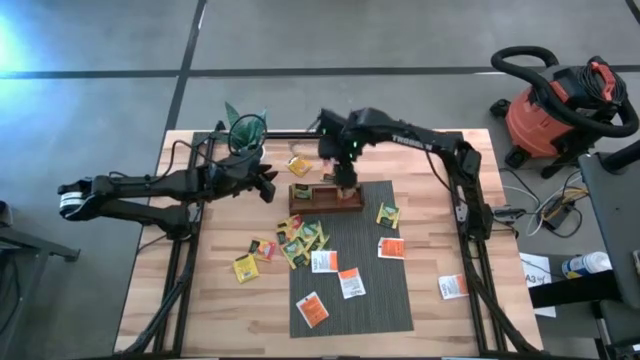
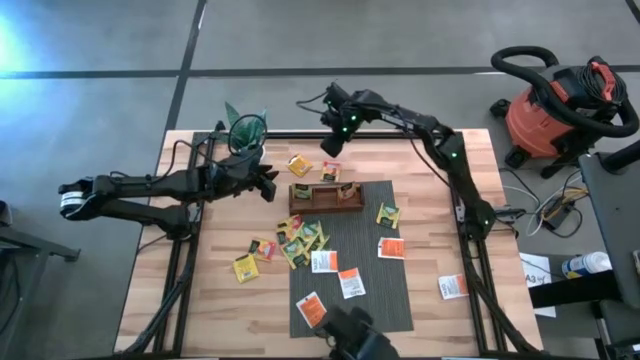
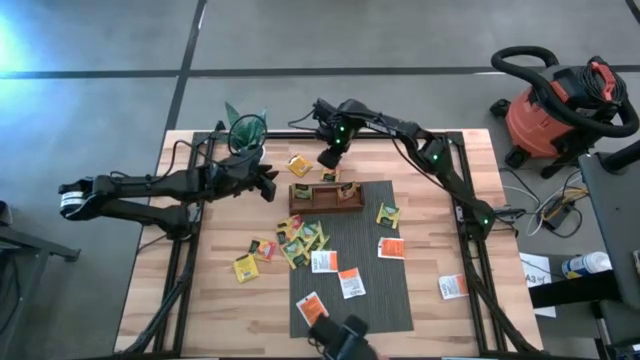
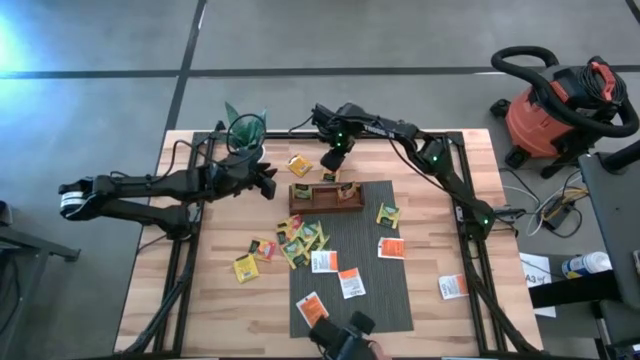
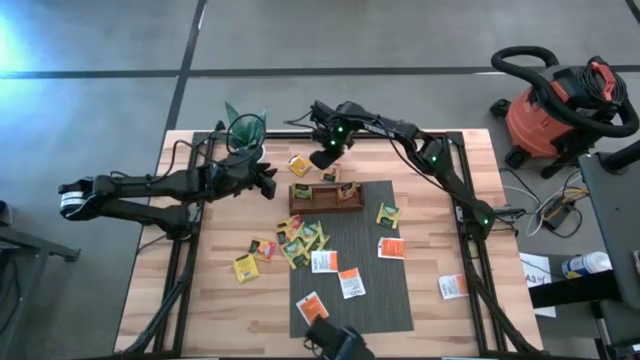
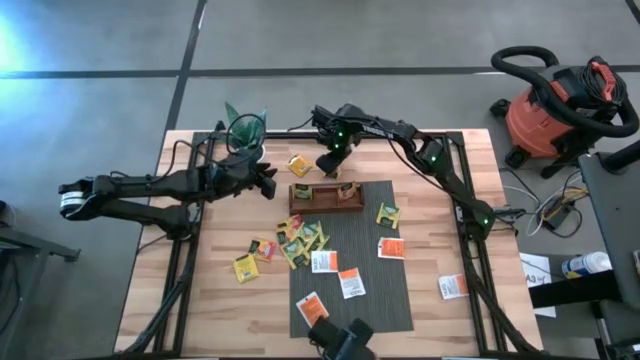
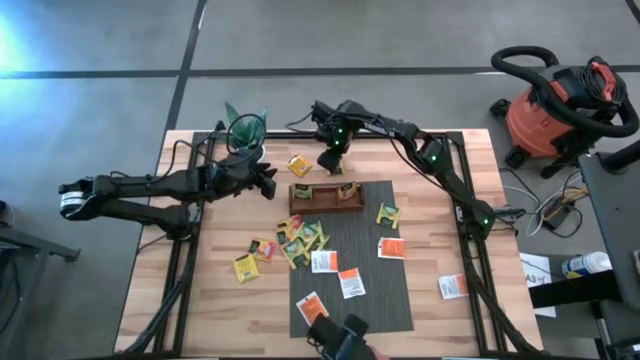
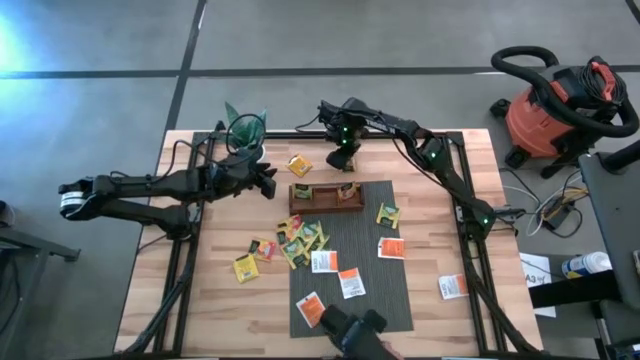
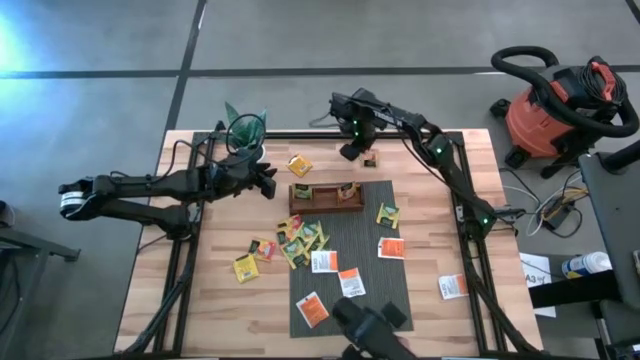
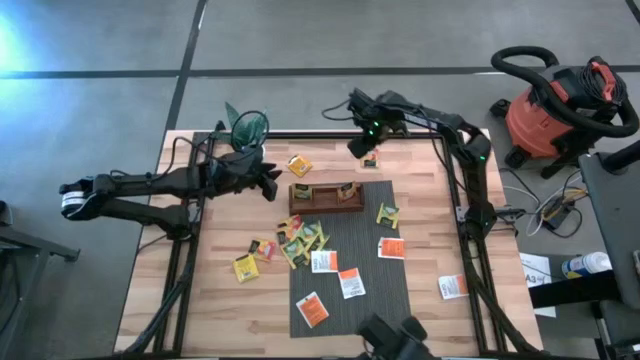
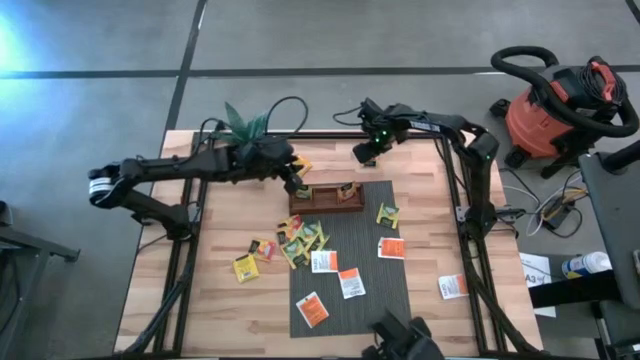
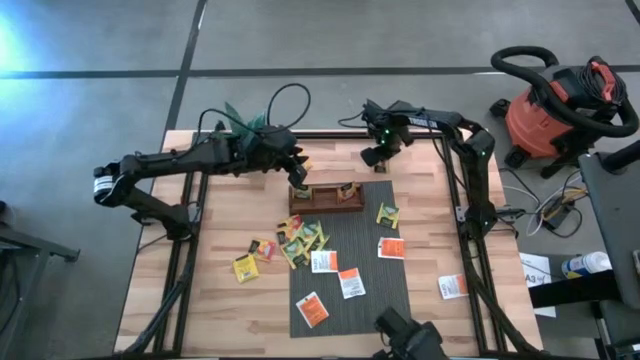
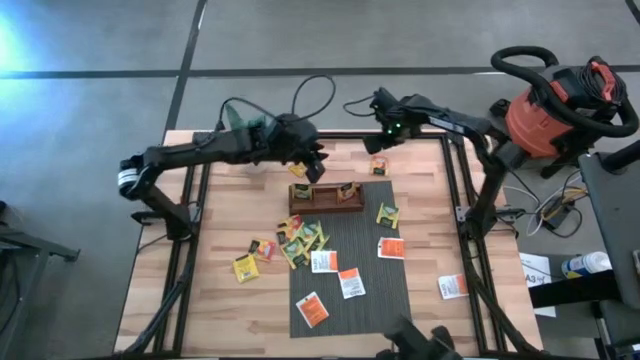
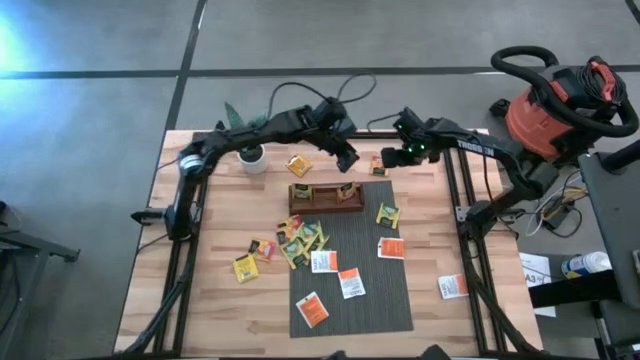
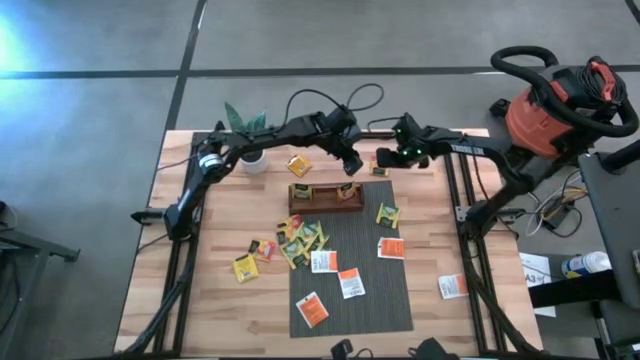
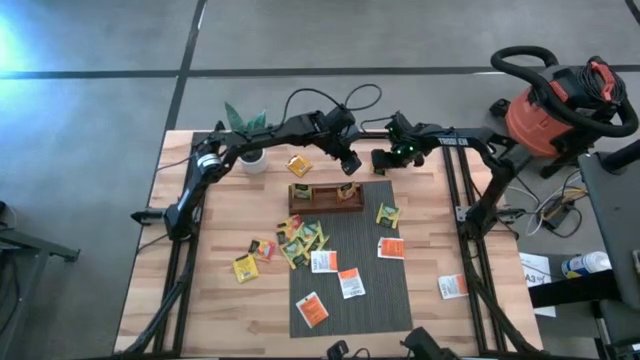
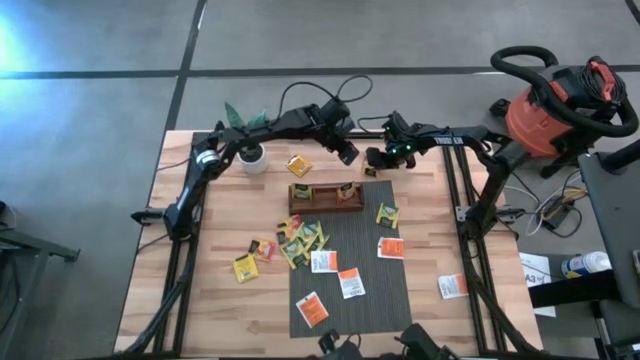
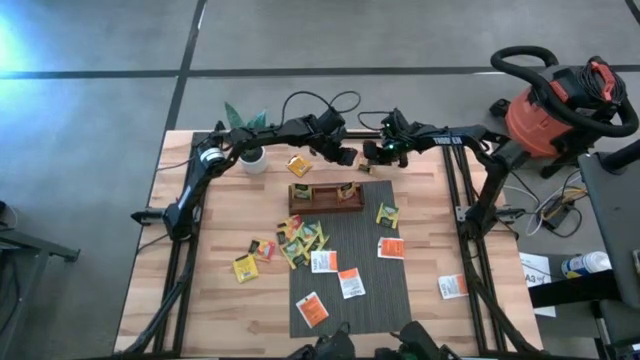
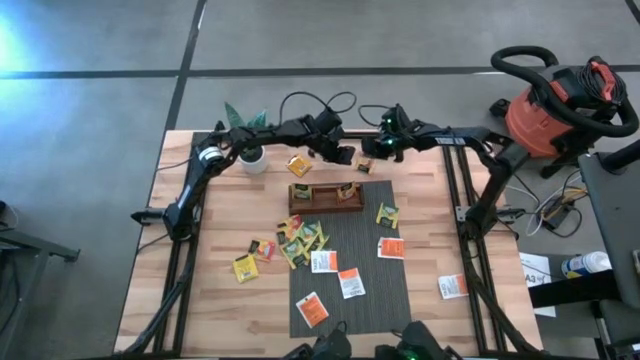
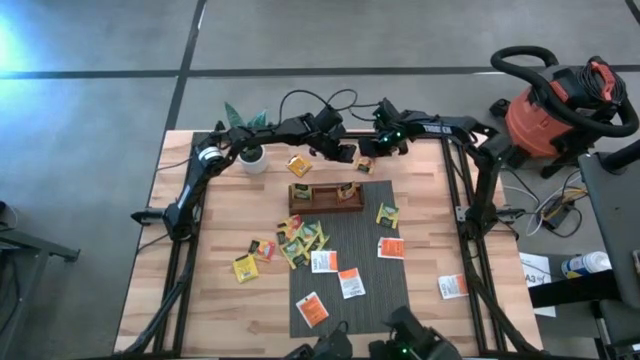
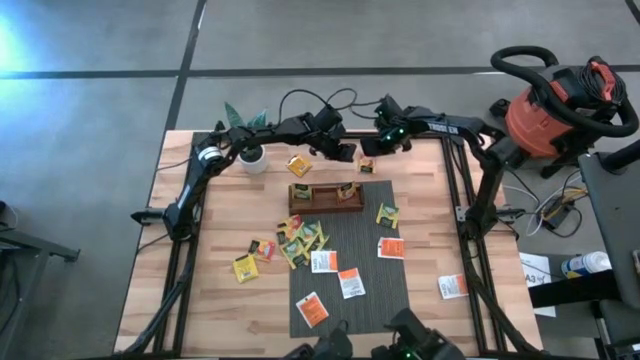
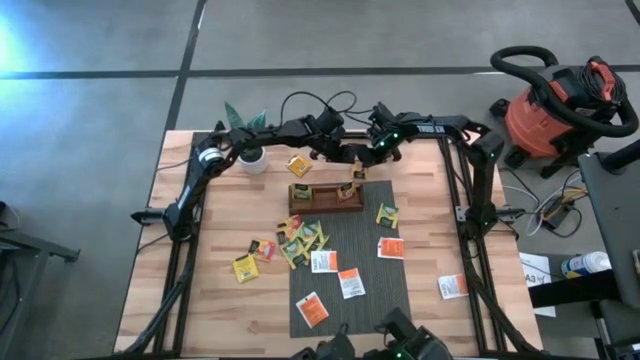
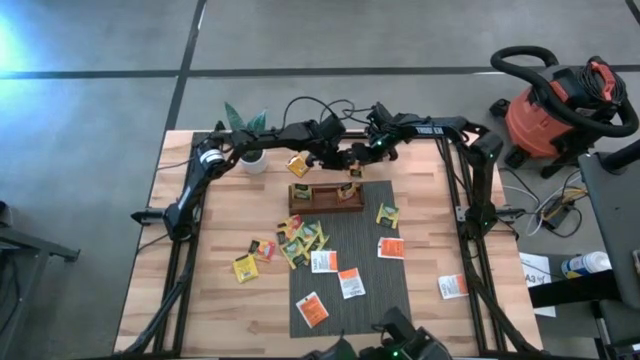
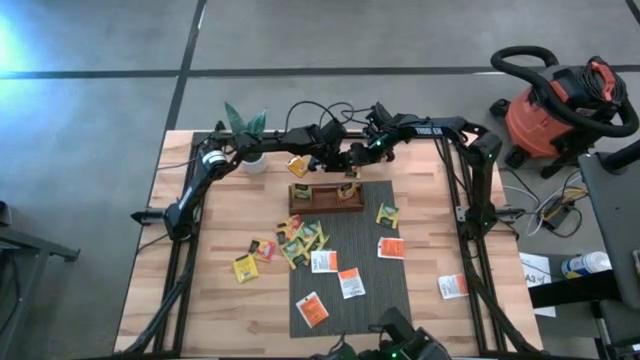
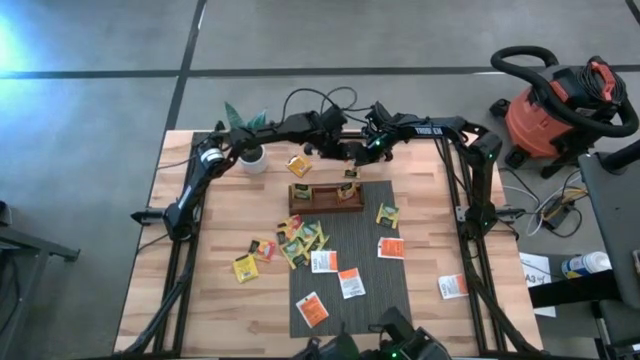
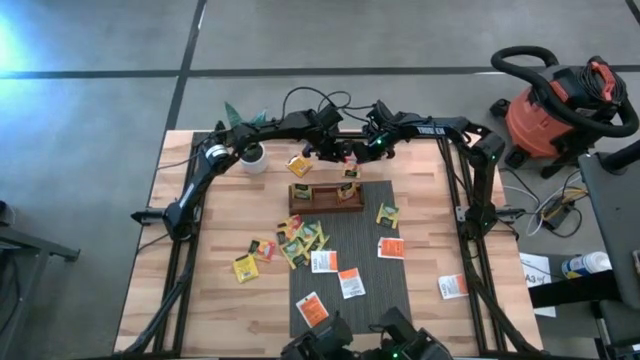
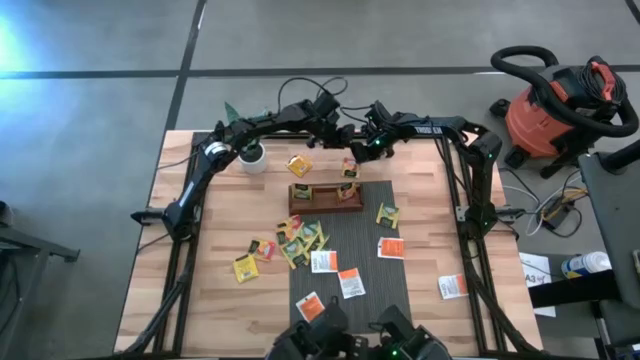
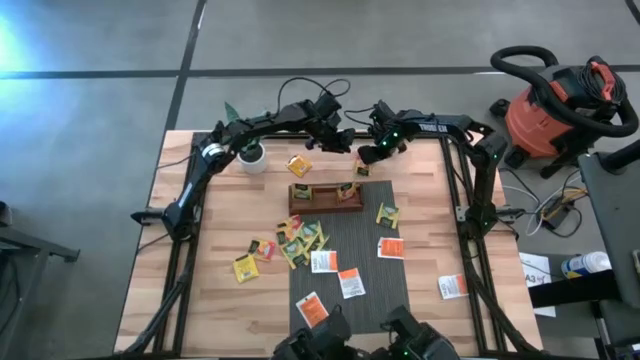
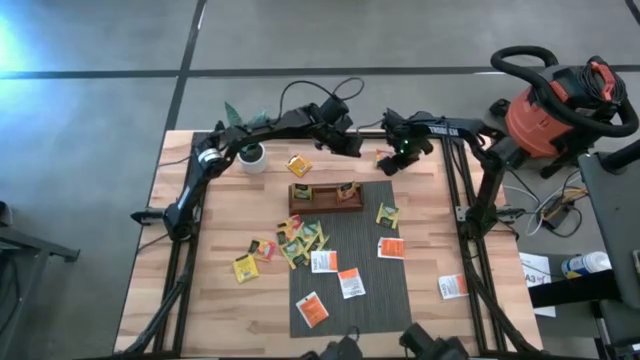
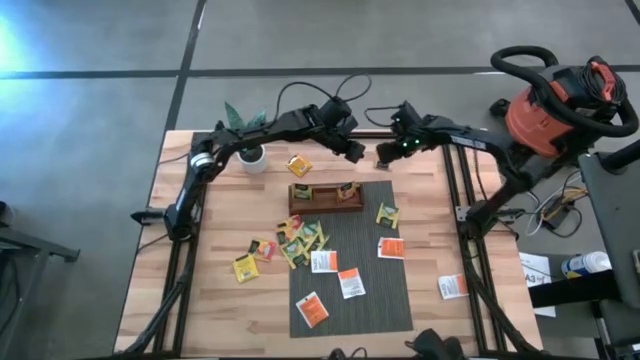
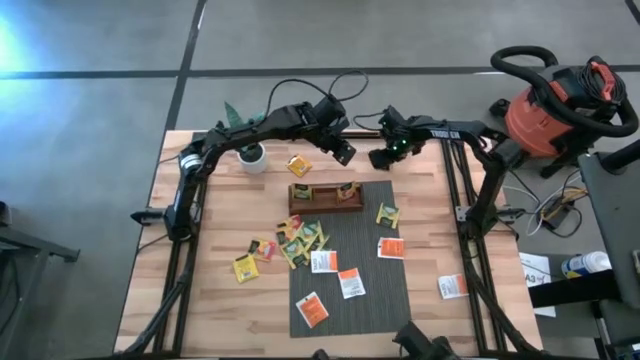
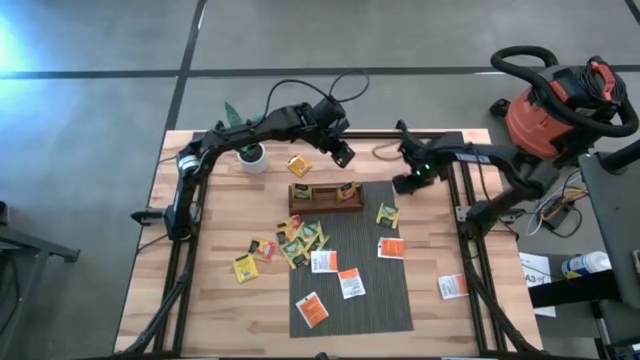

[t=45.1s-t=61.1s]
Task: Pick & Place Tea
Put the orange tea bag into the right compartment of the wooden organizer

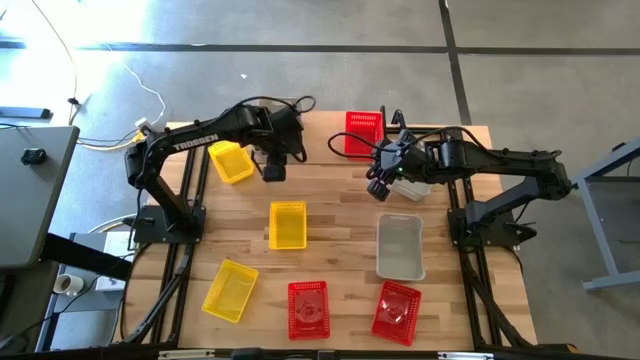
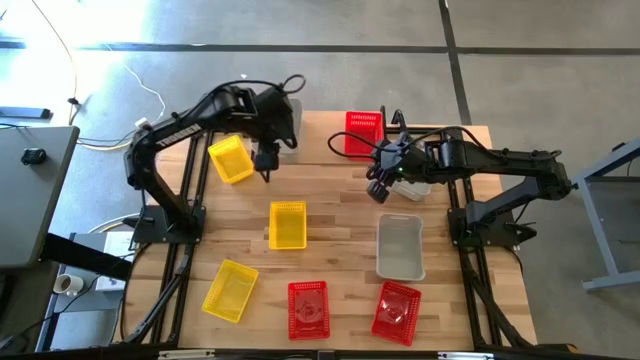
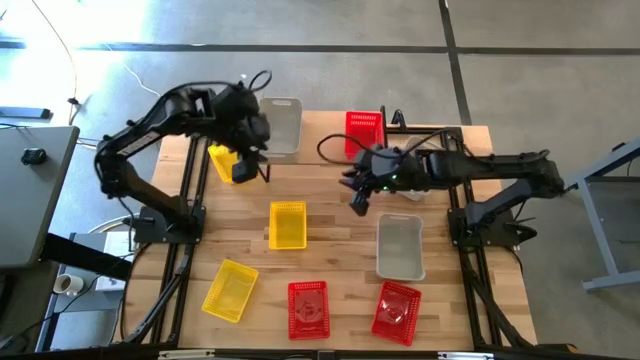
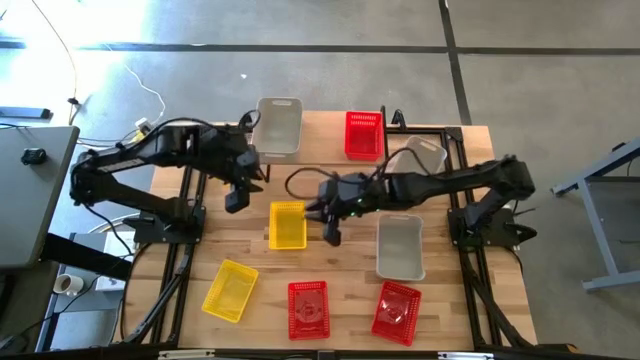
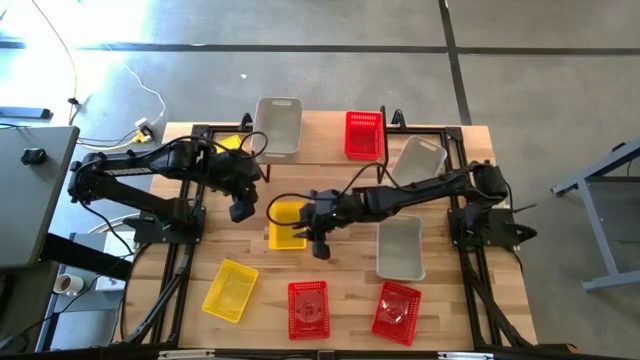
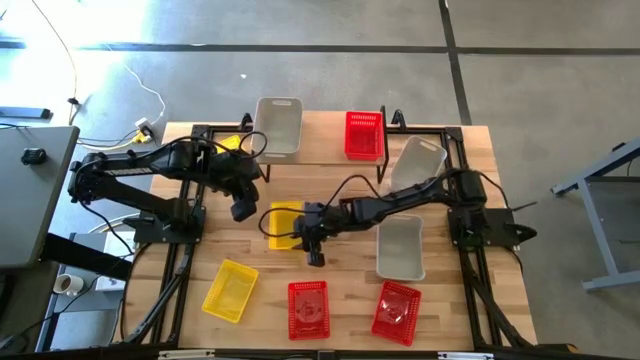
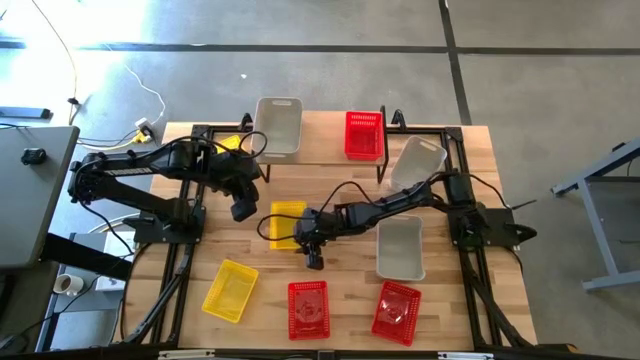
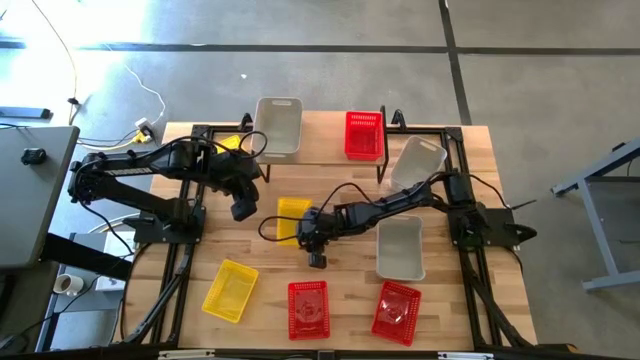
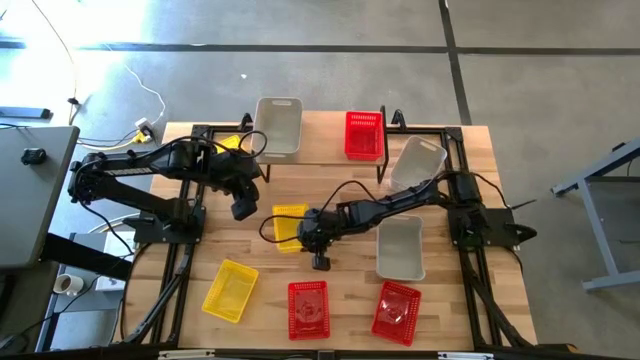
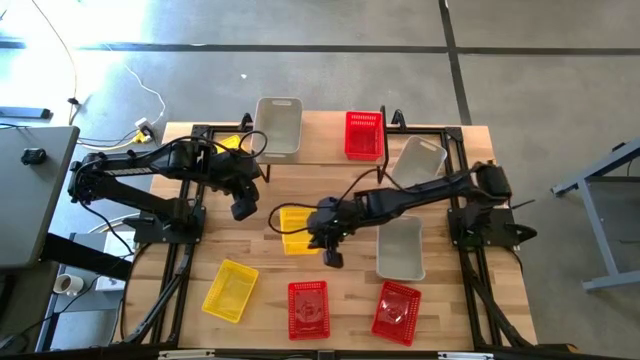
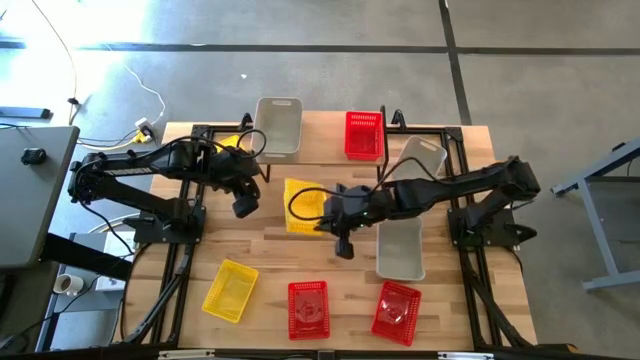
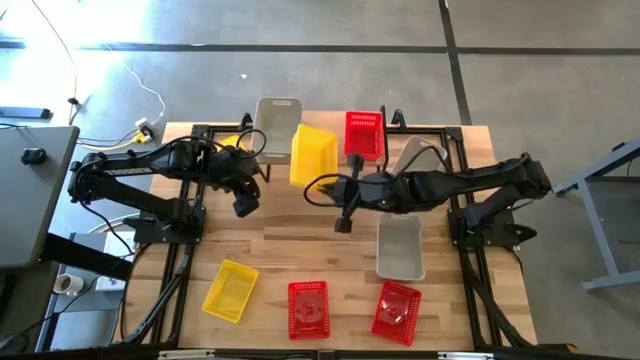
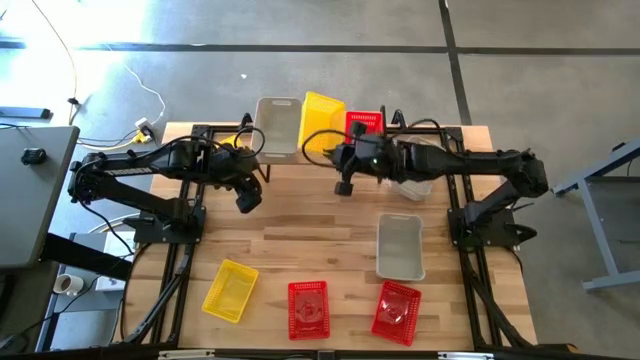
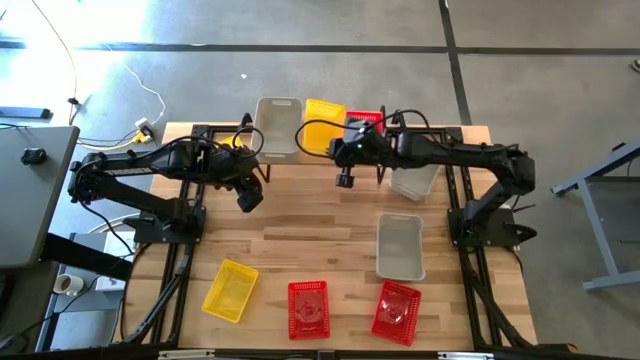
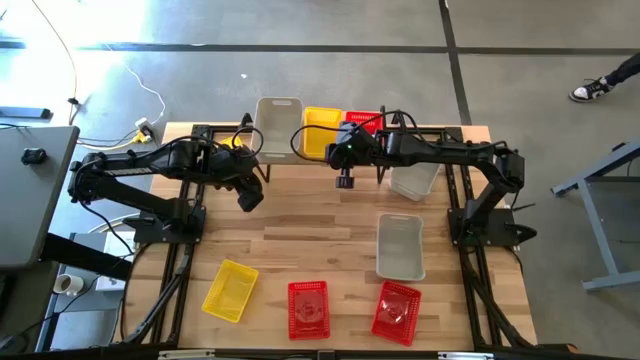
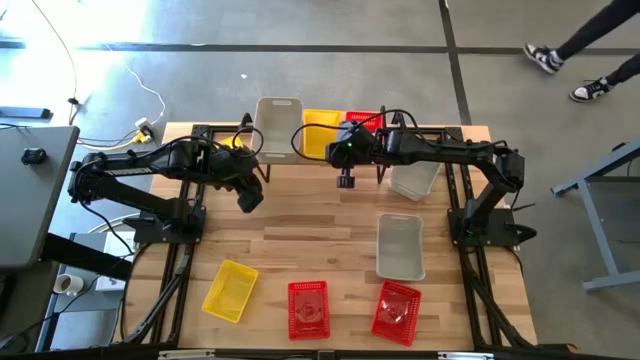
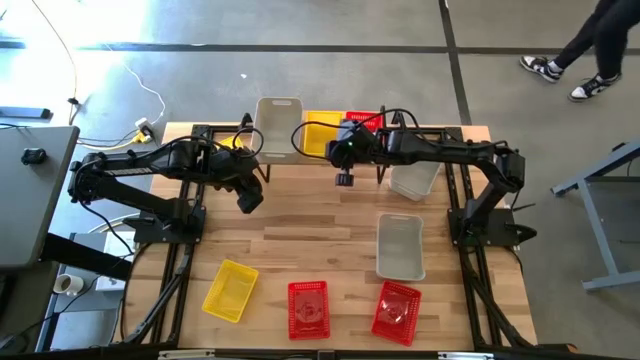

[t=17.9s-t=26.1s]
Task: Stack baskets on shelf by color
Put the middle right yellow bin on the shelf
